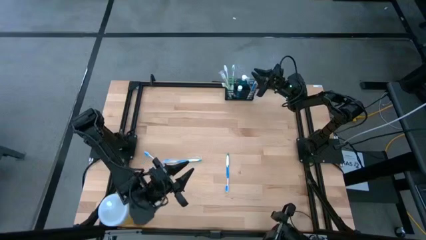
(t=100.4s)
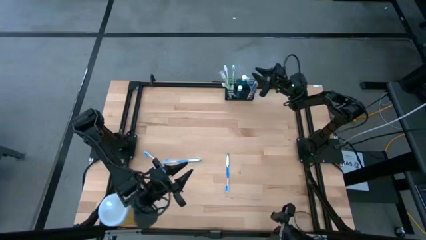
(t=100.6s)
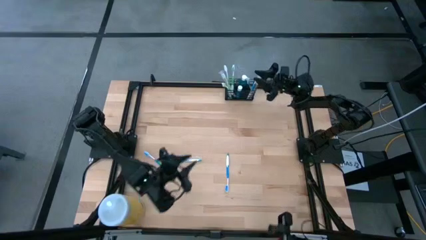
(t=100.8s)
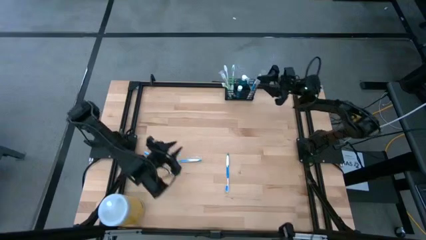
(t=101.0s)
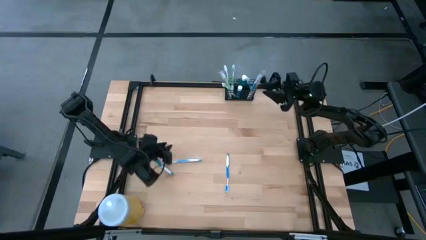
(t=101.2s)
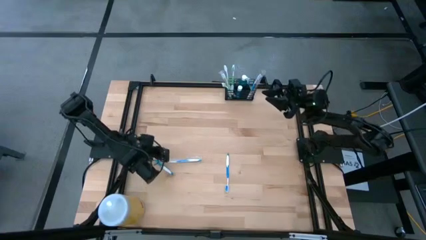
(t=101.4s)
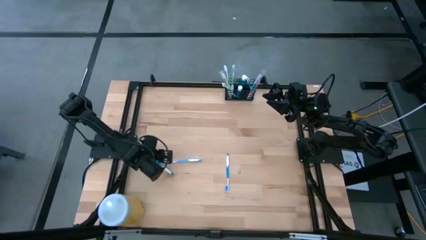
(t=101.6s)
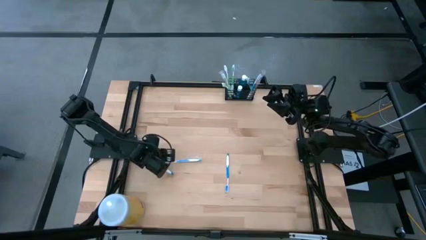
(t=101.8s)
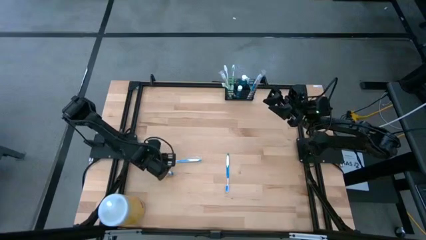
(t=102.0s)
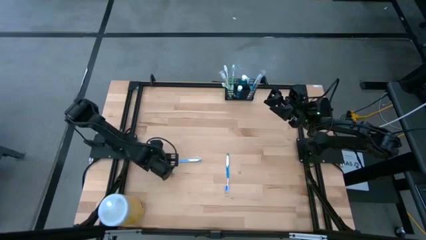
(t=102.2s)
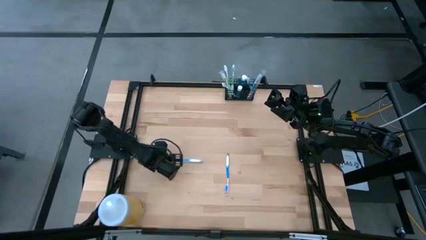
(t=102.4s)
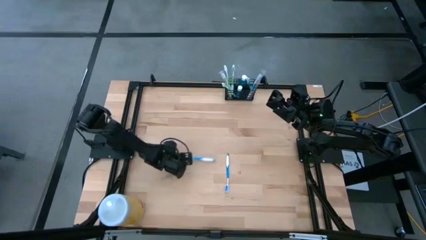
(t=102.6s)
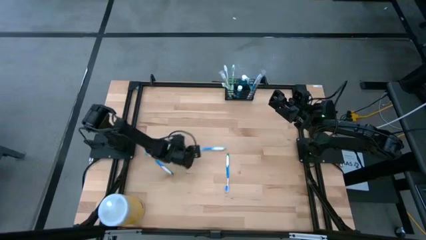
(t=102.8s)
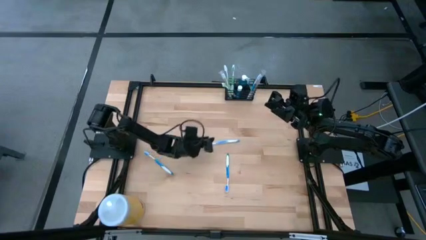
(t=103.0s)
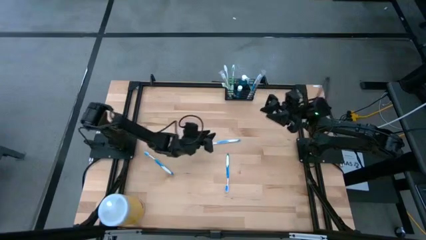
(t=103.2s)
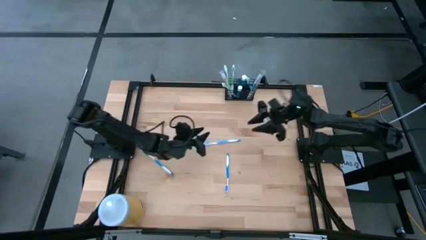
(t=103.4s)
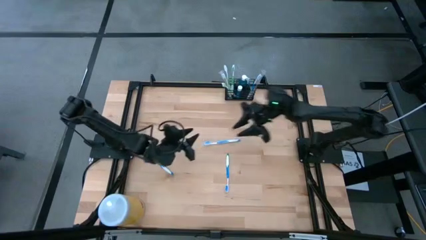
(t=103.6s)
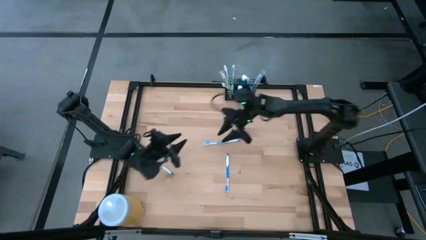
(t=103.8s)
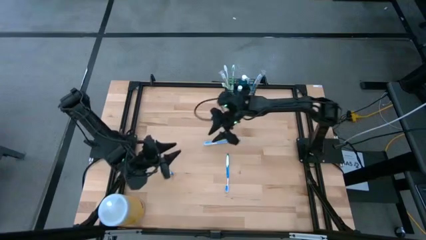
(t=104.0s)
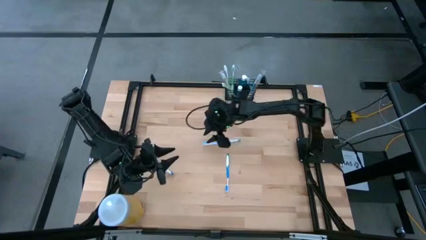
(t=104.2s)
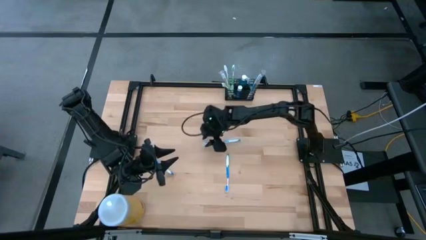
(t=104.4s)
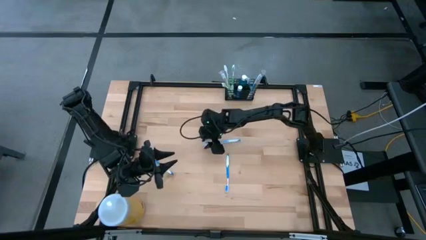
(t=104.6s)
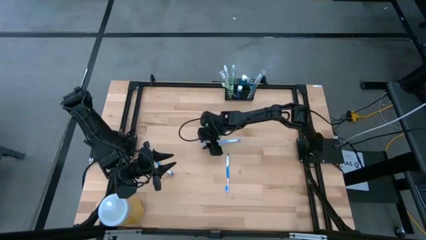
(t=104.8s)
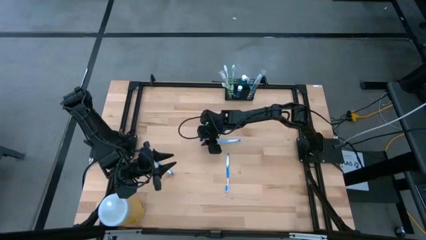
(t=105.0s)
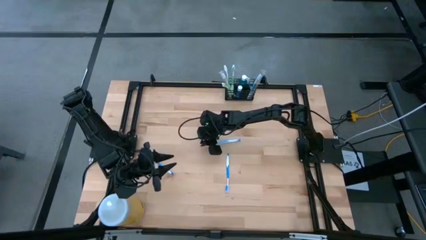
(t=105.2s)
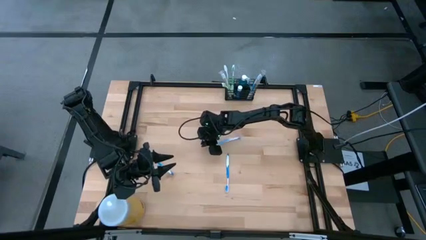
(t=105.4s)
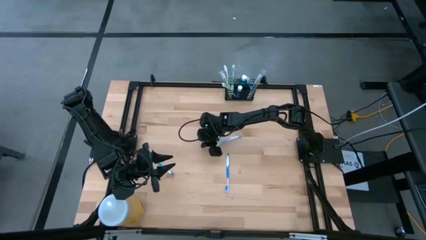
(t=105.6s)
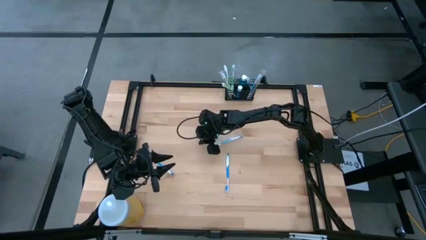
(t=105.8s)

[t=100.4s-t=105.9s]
Task: Pick & Place toothbrushing station
Put the blue toothbrush into the black organizer

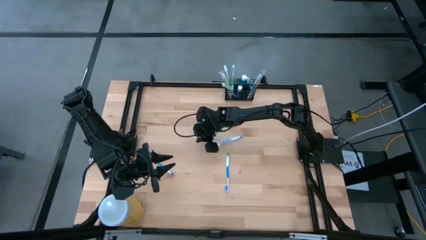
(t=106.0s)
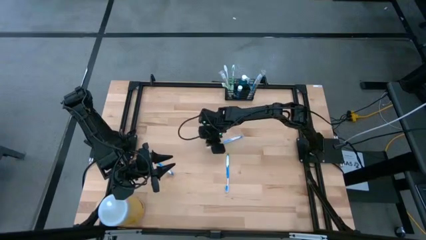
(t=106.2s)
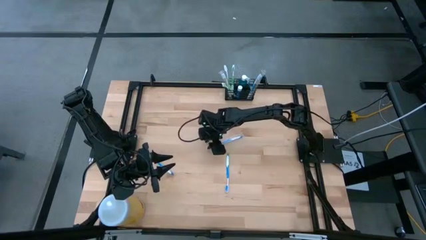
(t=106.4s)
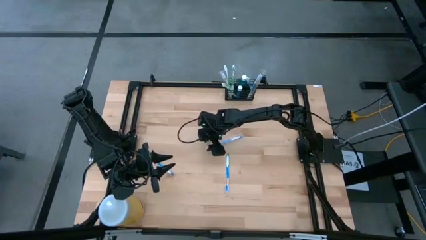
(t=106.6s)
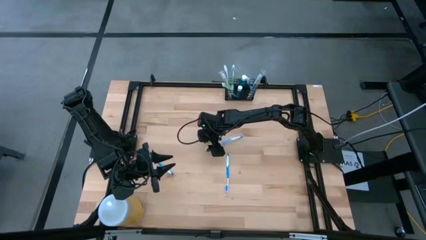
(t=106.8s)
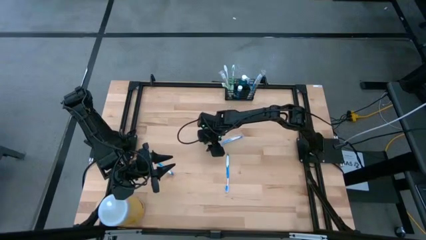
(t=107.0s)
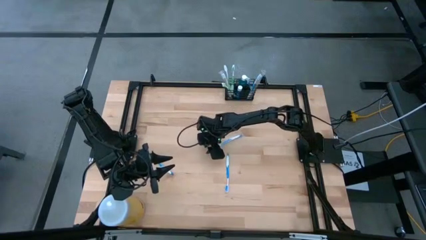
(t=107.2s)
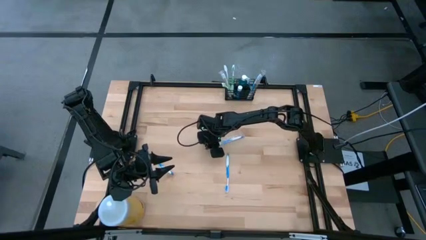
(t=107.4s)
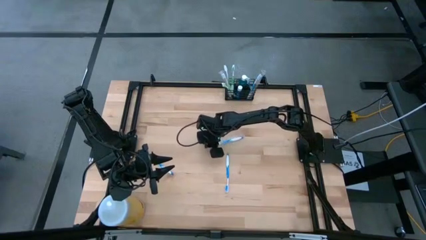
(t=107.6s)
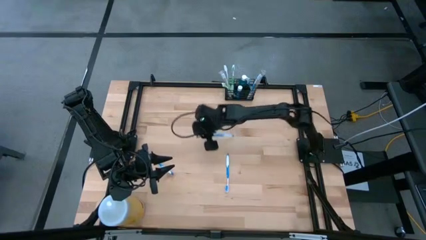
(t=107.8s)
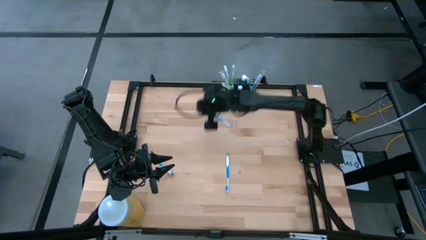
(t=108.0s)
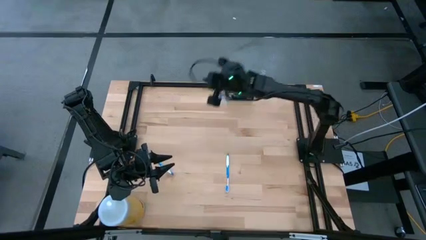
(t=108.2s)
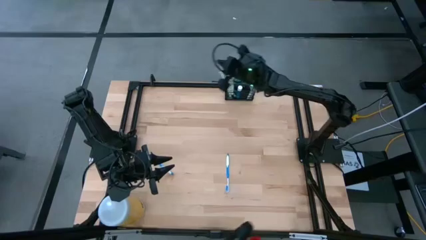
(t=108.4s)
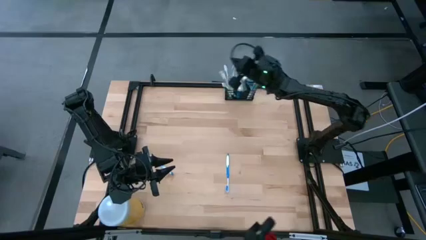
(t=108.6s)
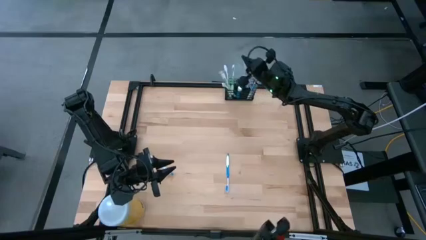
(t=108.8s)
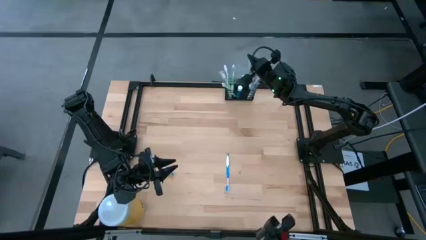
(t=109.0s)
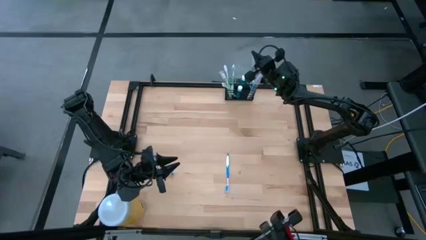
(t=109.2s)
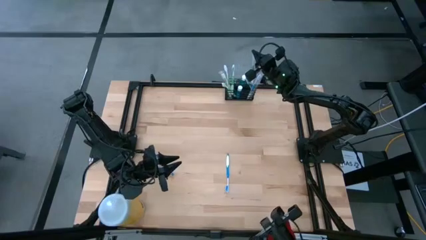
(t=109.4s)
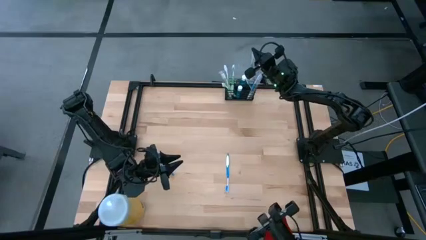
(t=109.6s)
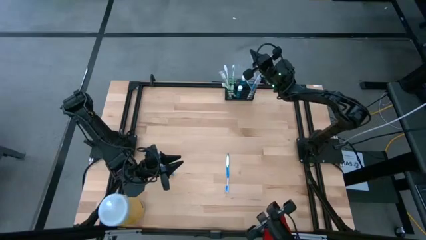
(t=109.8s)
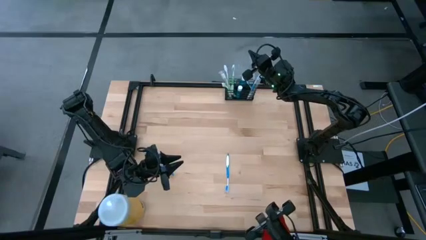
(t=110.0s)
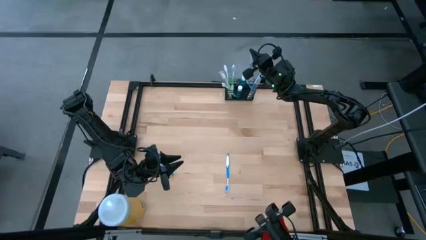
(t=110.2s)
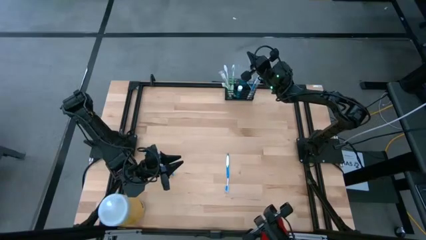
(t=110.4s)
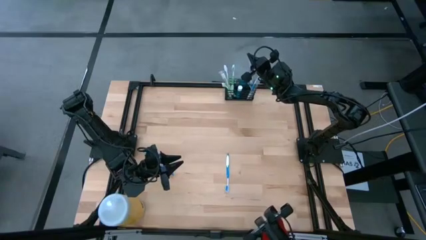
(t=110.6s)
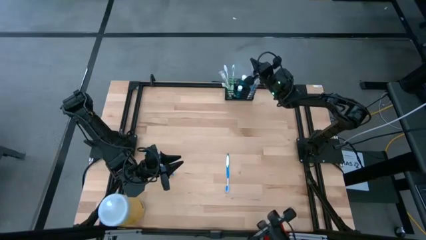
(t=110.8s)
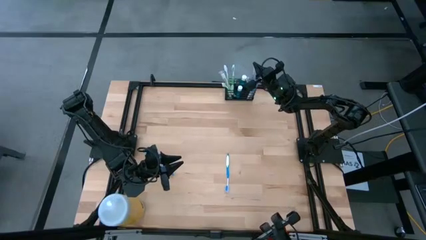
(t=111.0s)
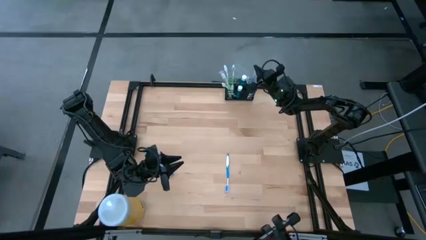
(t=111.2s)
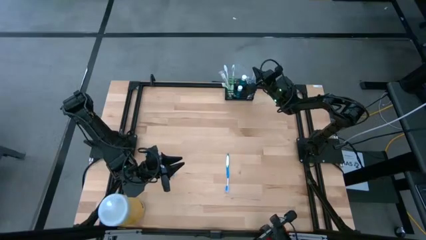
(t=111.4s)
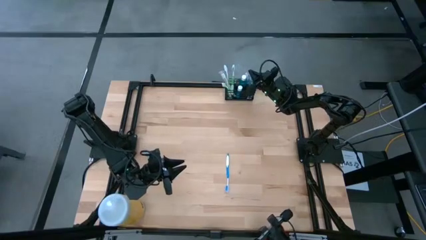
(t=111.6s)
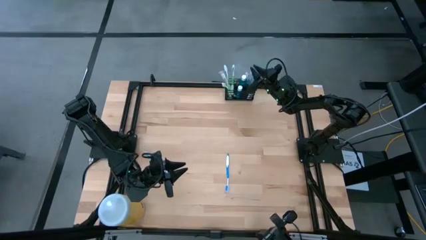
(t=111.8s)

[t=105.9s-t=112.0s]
Put the blue toothbrush into the black organizer

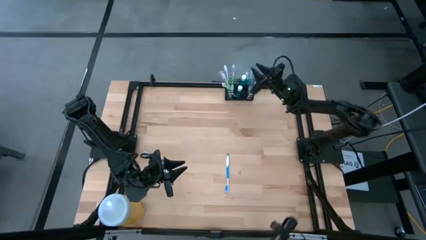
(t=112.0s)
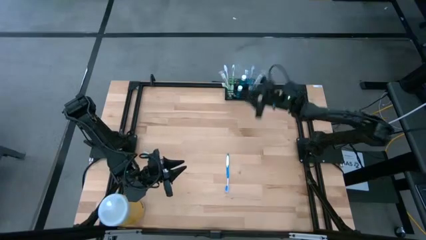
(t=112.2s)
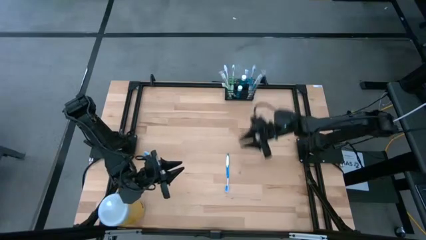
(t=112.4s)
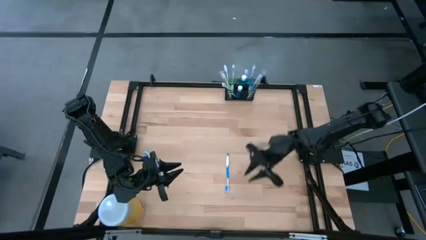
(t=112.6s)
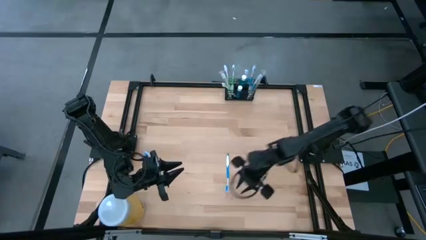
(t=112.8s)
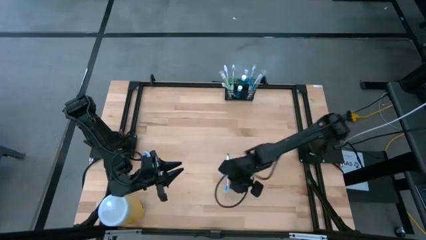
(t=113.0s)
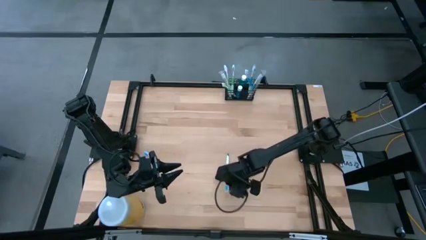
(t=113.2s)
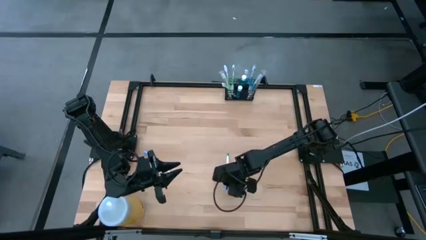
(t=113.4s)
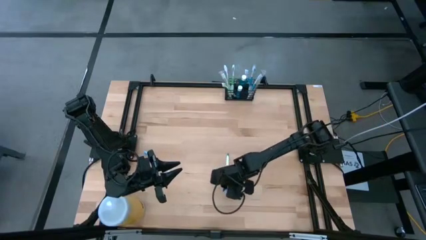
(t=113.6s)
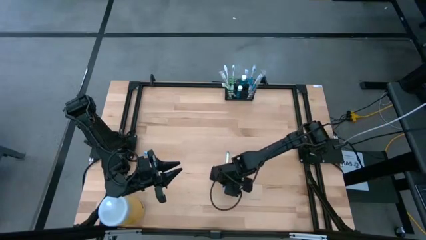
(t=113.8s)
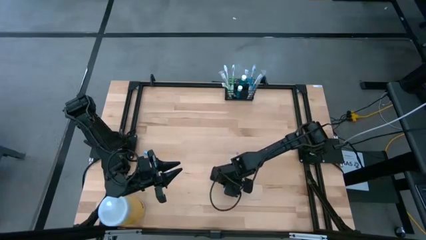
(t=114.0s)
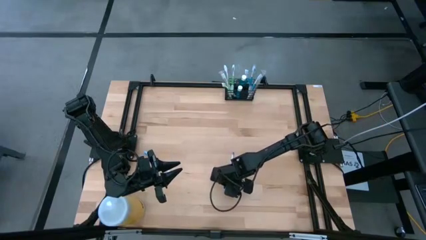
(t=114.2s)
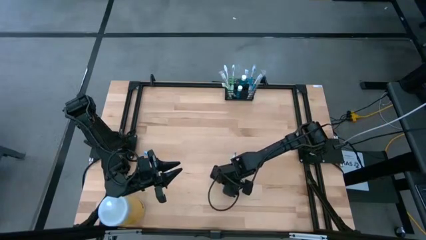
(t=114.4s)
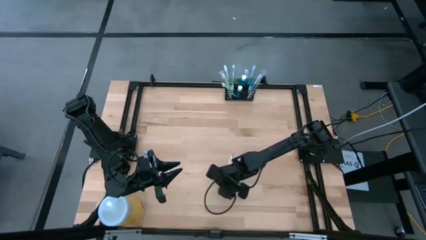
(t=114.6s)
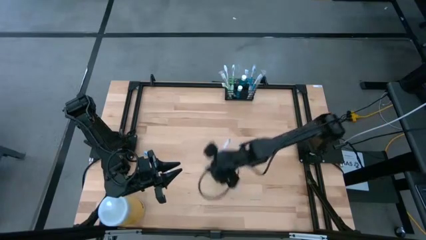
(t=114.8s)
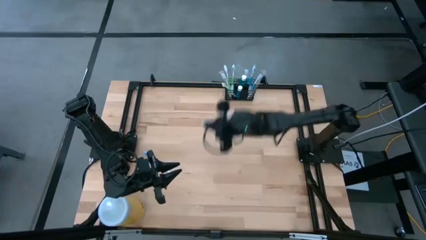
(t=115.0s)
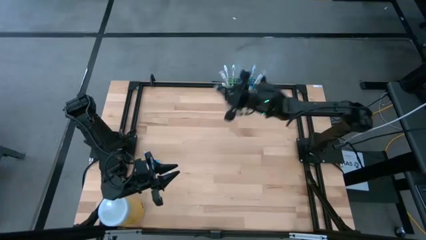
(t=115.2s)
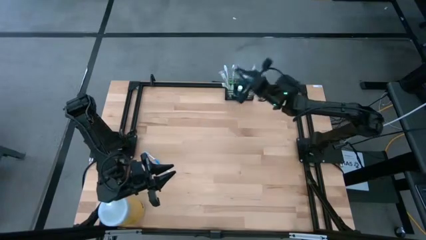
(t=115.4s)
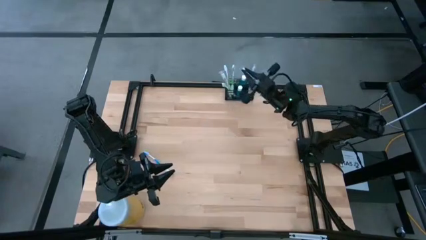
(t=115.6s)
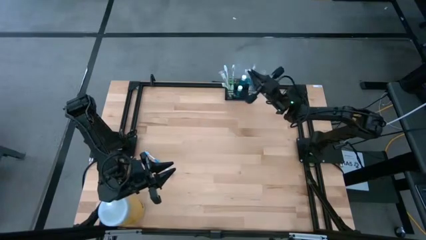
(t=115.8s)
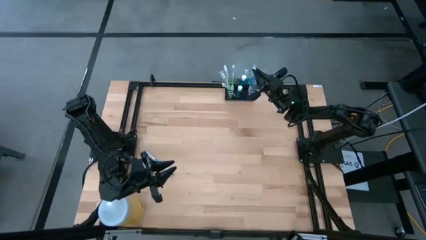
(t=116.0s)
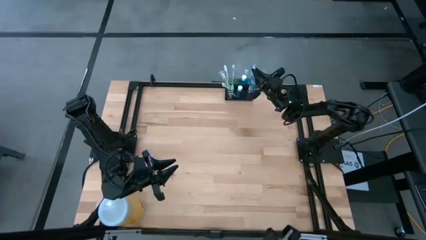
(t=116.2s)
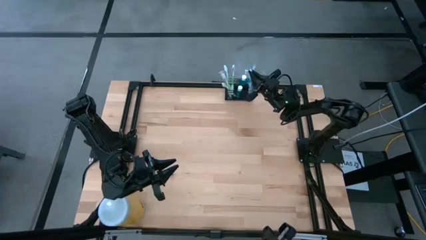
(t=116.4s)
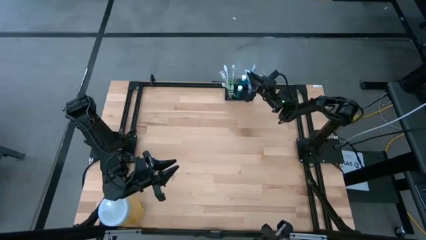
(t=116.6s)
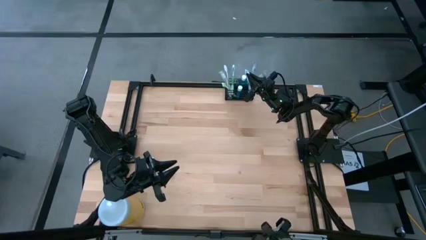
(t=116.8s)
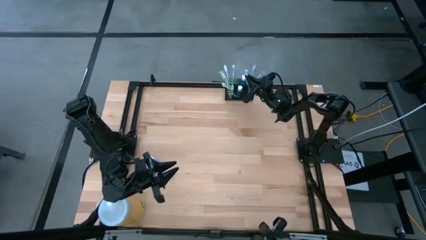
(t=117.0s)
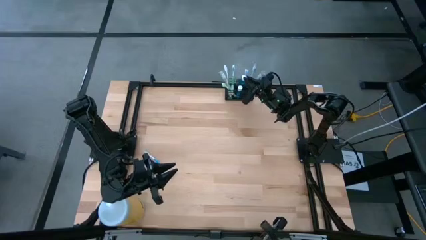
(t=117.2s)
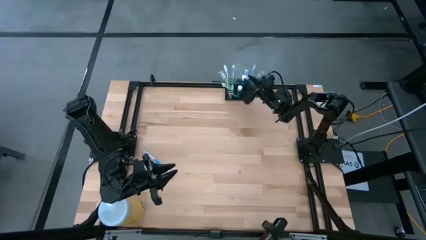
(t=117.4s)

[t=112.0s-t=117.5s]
Put the blue toothbrush into the black organizer
